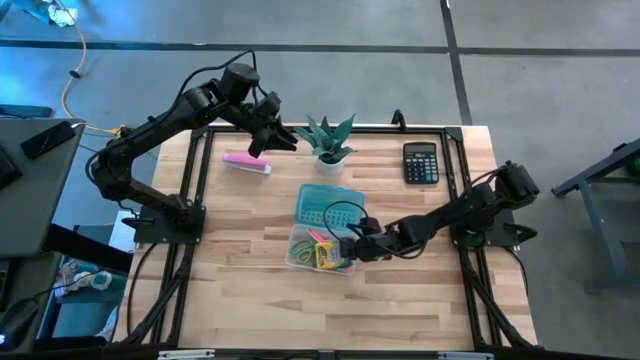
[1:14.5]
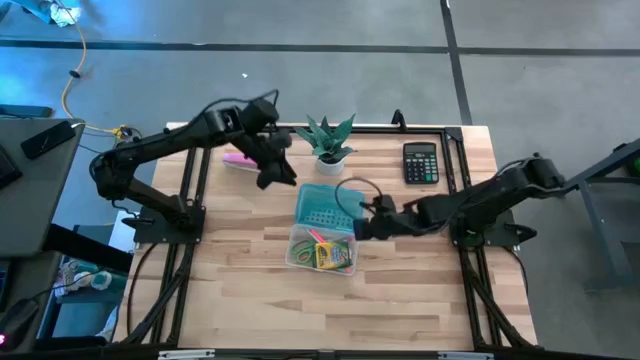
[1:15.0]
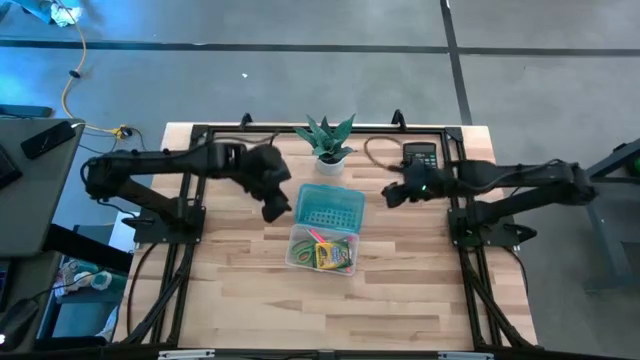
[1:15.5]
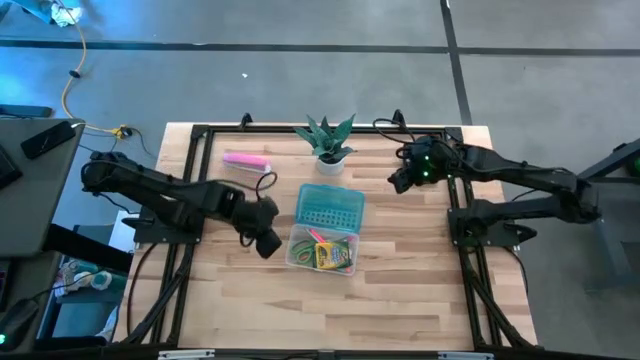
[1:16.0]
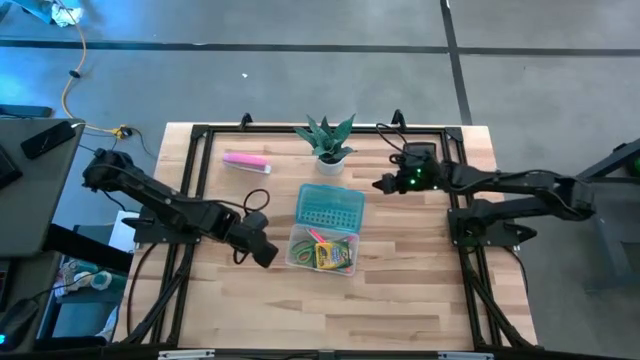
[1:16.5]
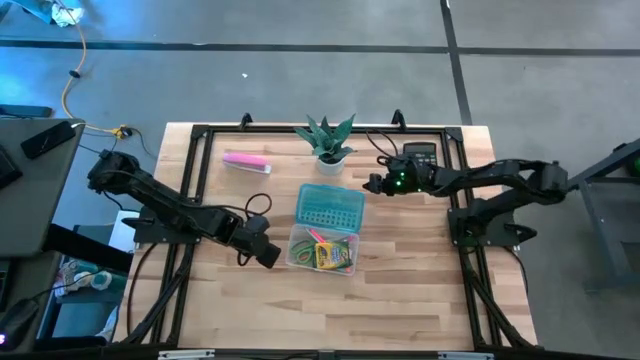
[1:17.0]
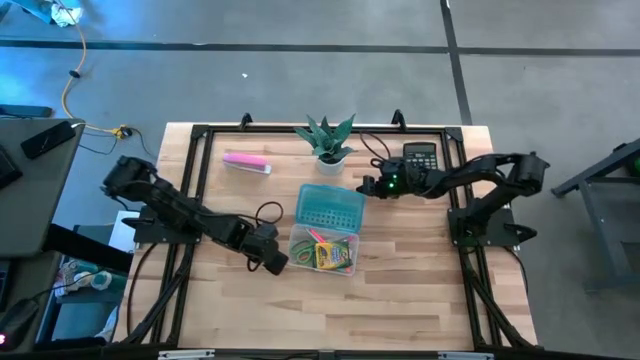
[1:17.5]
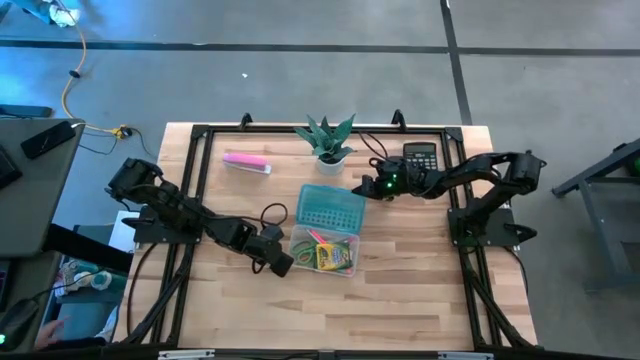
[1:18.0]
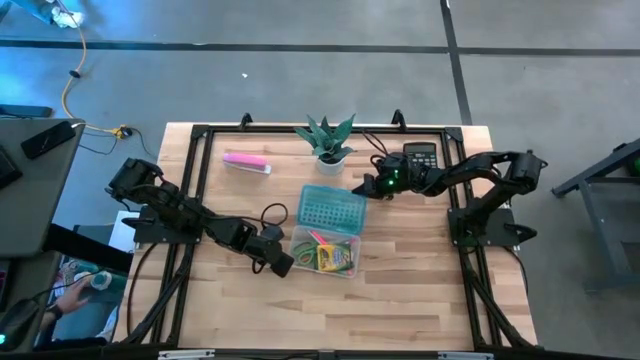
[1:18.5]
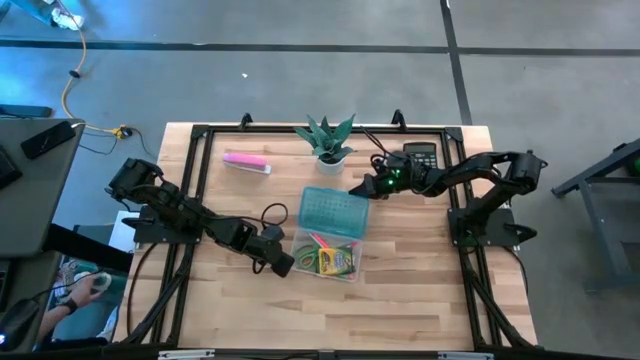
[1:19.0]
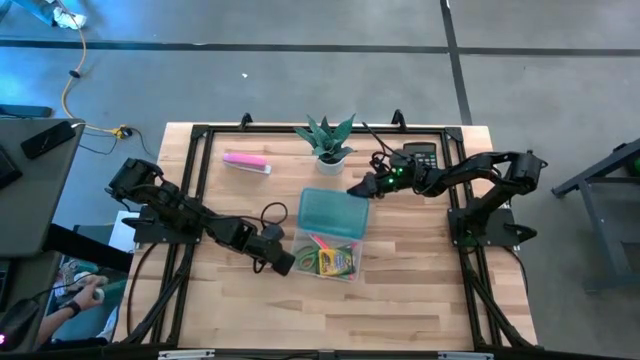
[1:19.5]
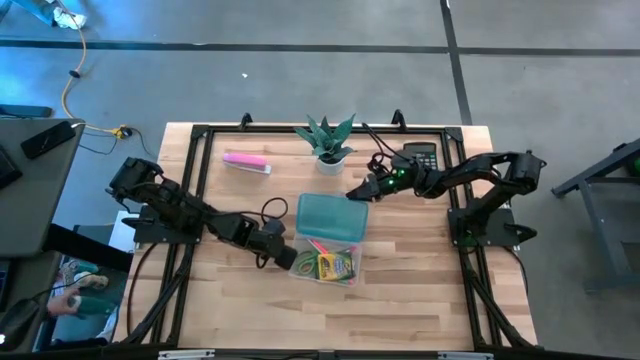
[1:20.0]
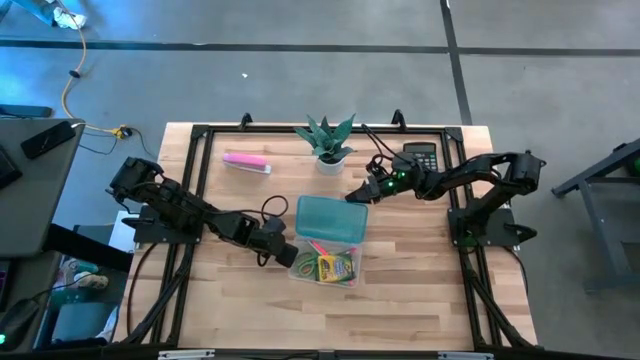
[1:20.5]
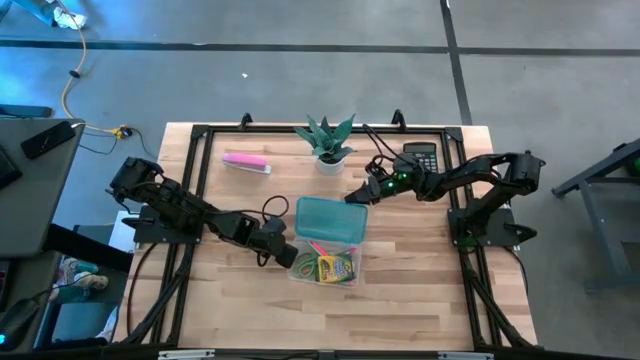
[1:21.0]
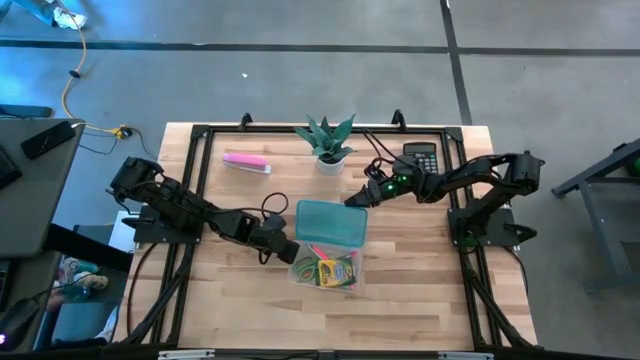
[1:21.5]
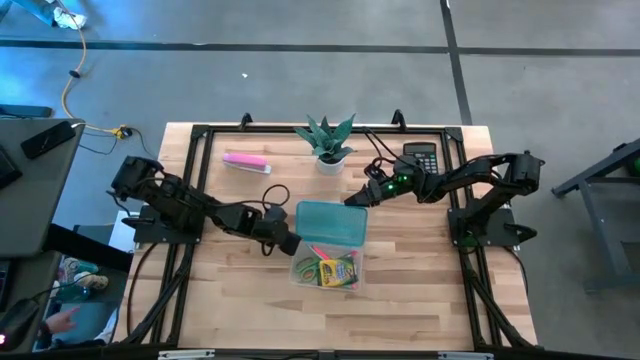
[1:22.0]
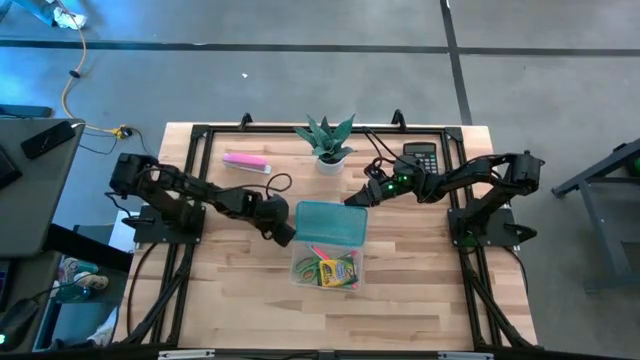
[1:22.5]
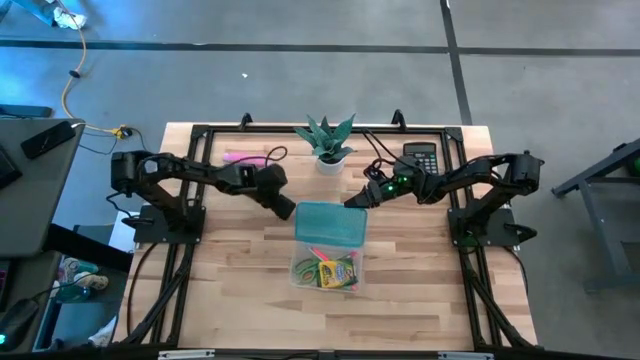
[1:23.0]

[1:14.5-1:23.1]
Task: Pack school essentials
Close the blue supply box

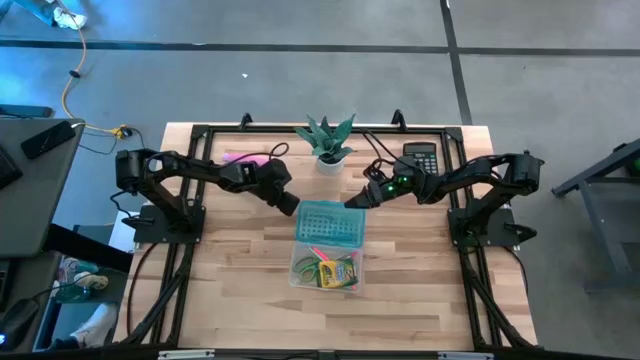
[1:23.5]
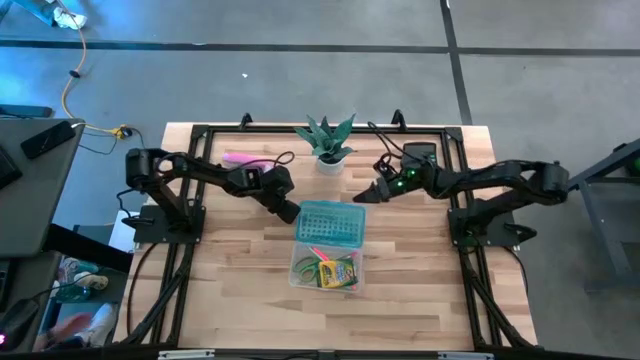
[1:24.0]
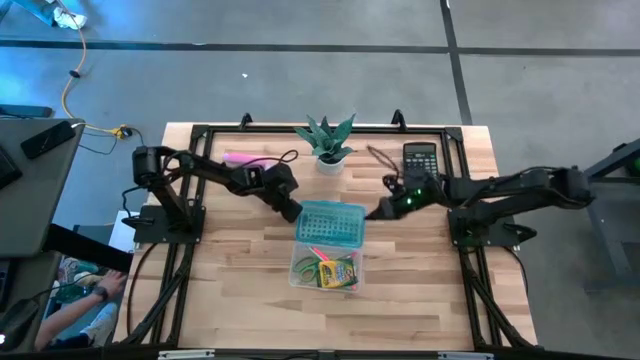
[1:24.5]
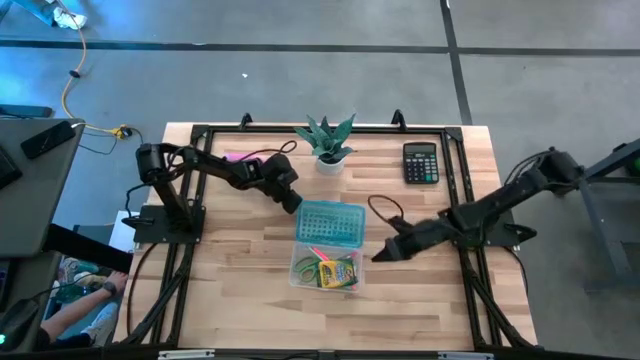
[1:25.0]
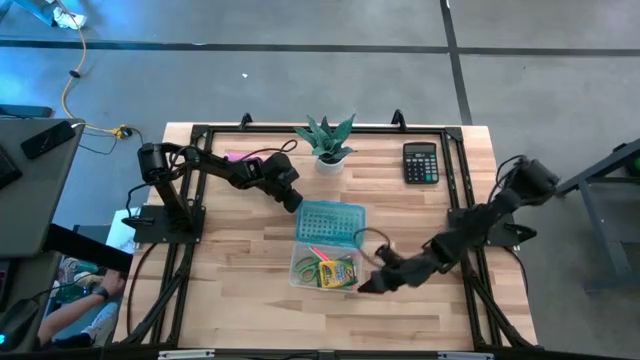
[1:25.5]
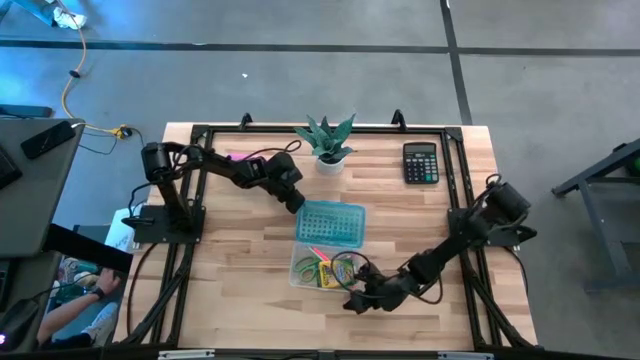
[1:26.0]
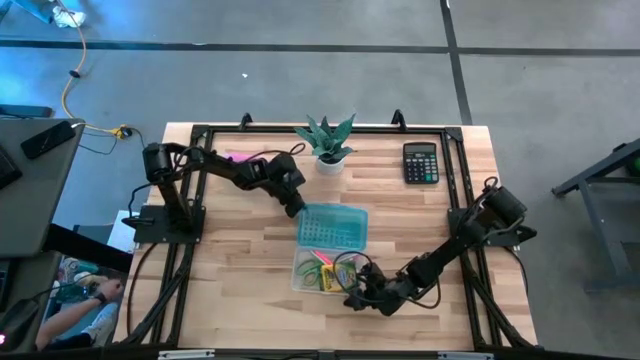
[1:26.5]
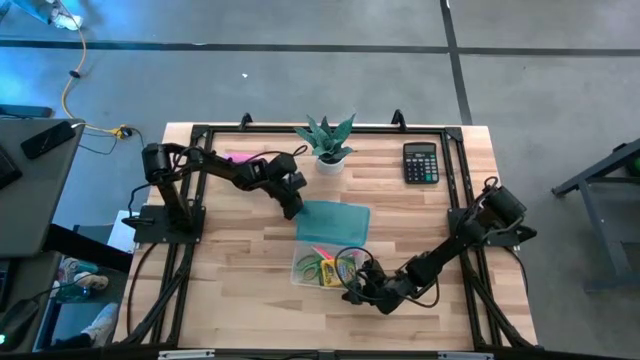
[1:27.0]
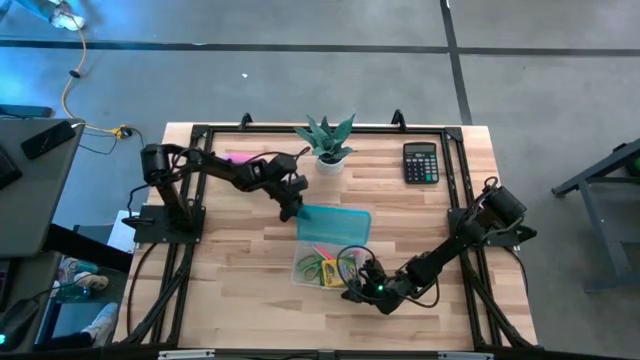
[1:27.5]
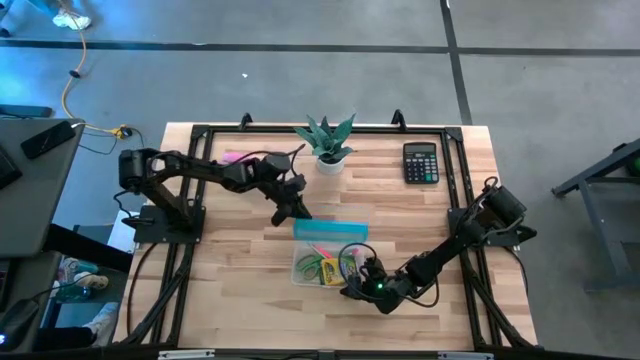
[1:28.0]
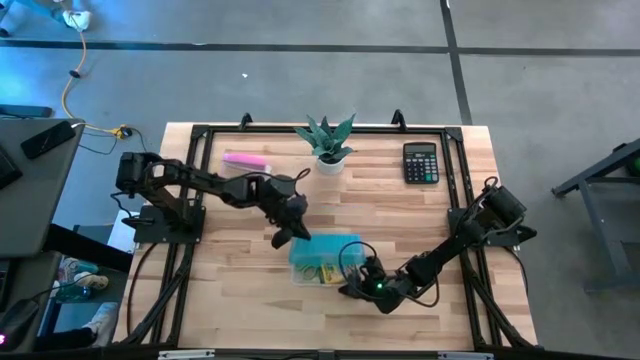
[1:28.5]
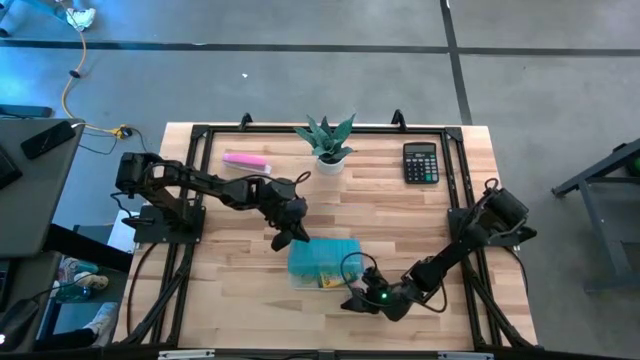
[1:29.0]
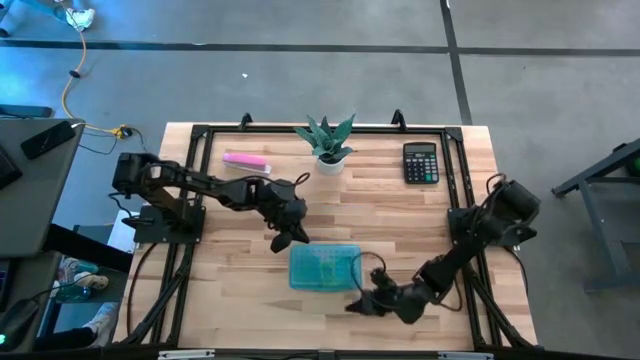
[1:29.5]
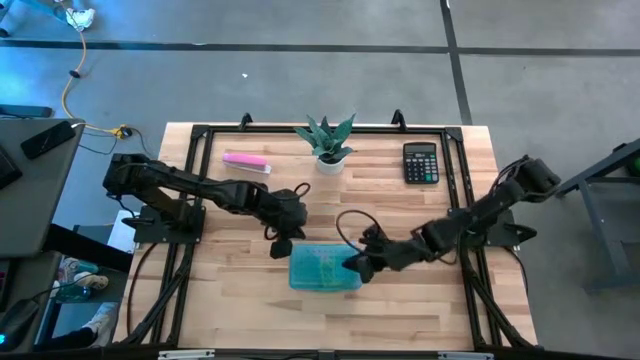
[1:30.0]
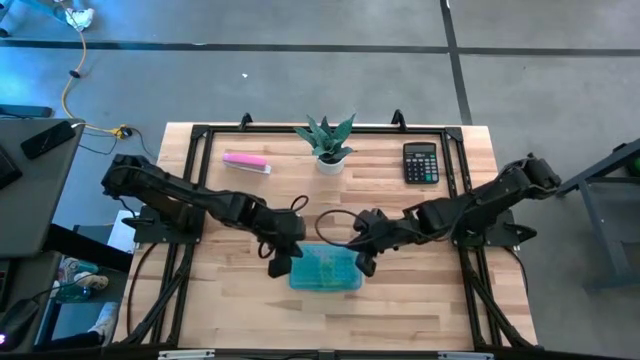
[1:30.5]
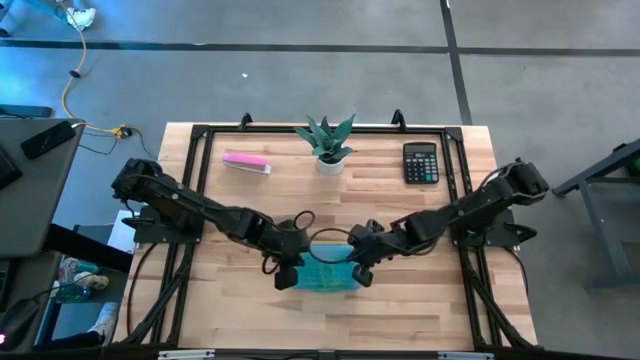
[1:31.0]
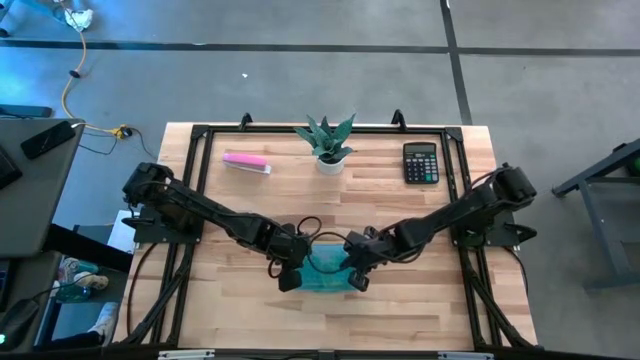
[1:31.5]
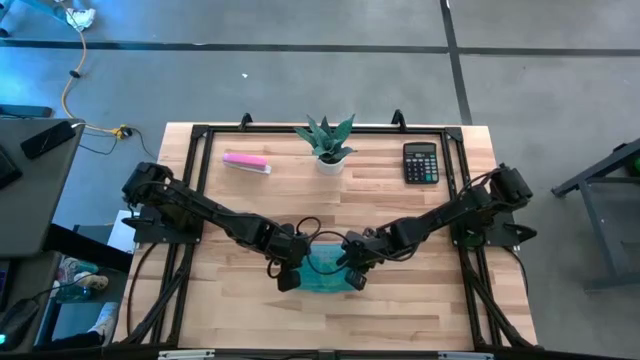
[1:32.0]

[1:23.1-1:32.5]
Close the blue supply box

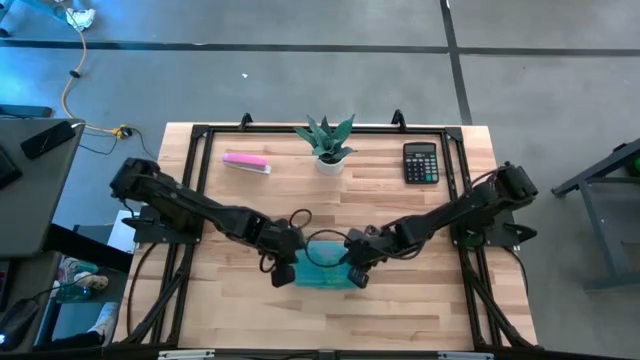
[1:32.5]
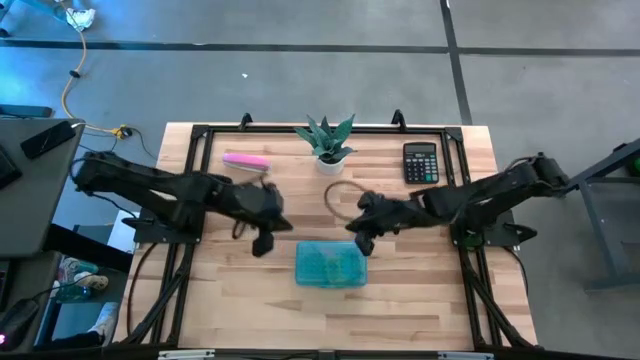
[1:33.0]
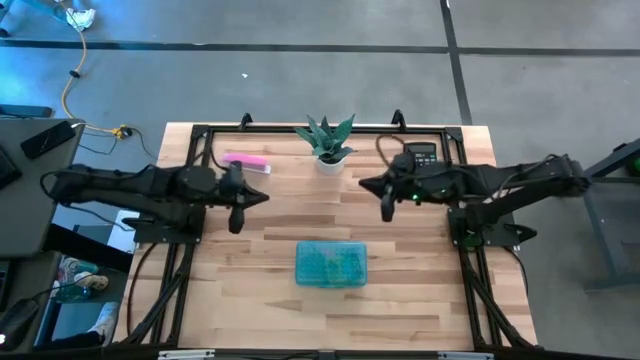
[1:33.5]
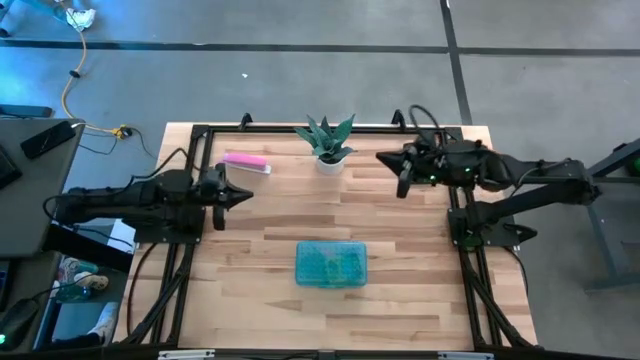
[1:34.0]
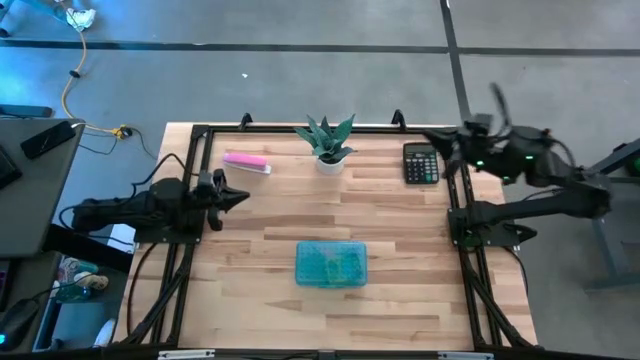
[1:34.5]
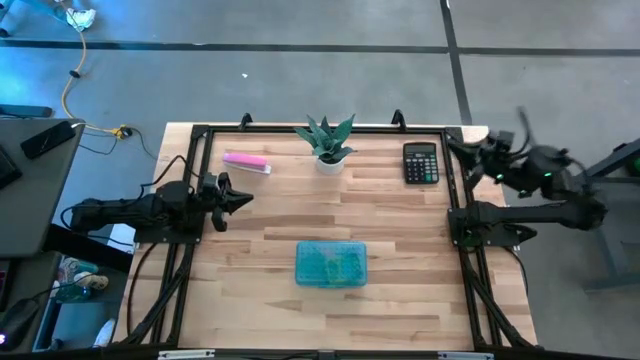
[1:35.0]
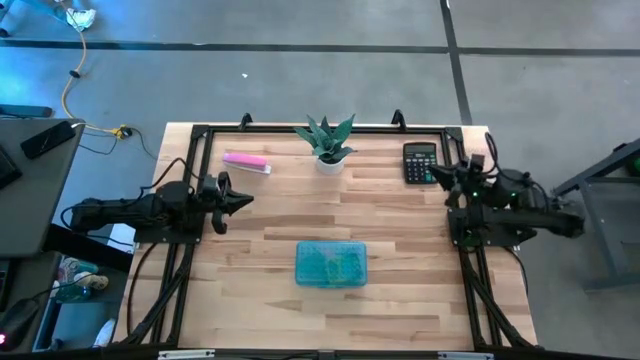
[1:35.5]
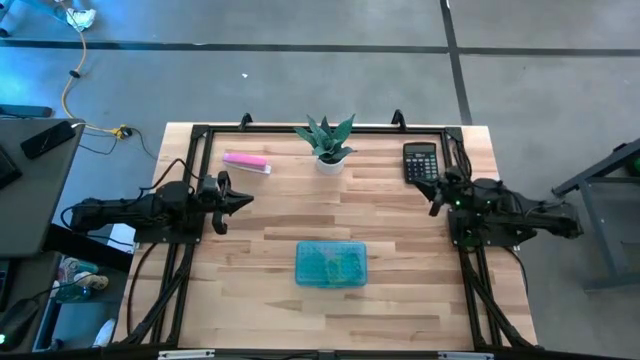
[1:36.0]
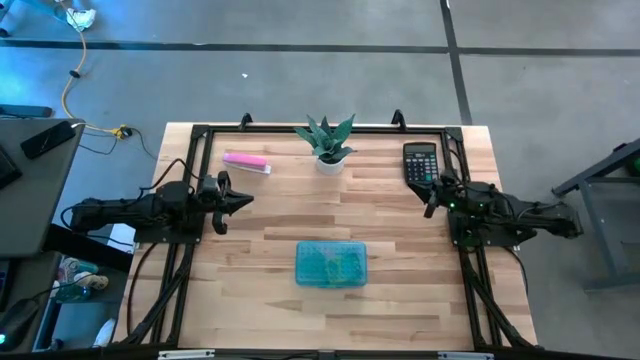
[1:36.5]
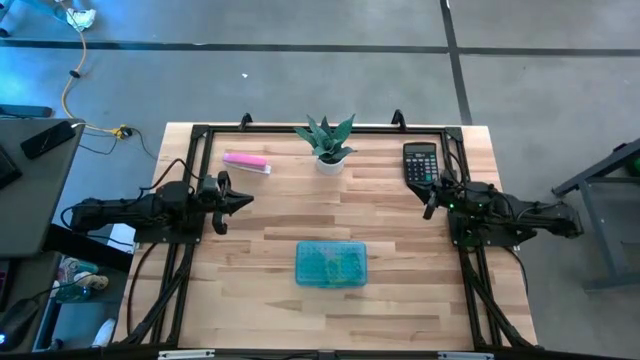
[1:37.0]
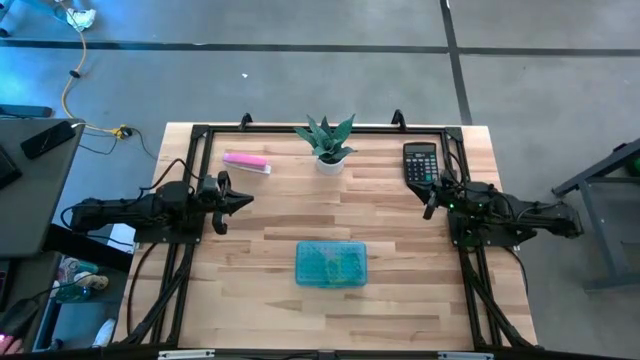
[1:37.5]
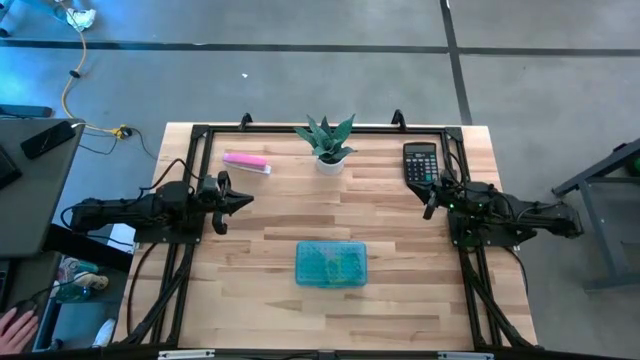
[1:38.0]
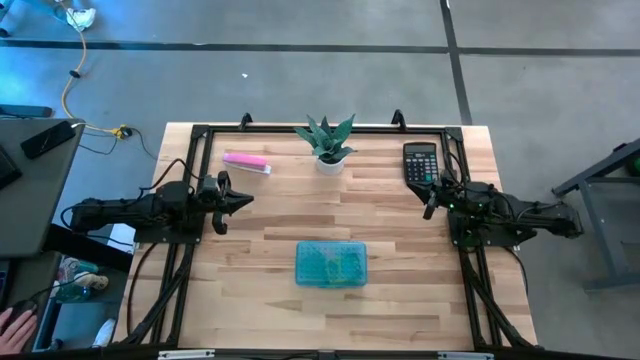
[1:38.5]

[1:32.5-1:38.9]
Return to Home Position
